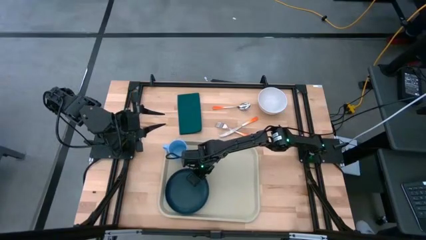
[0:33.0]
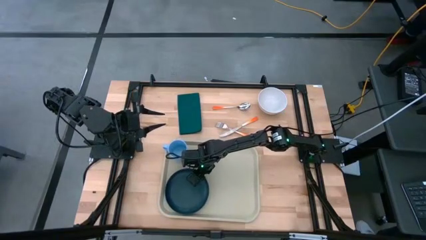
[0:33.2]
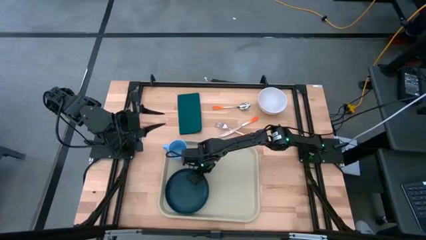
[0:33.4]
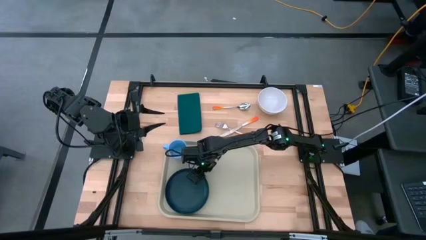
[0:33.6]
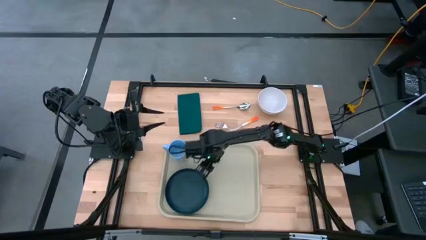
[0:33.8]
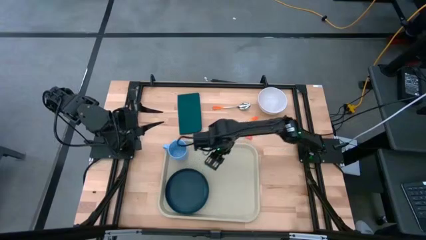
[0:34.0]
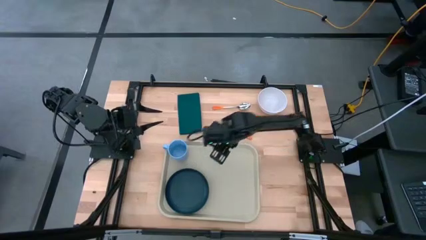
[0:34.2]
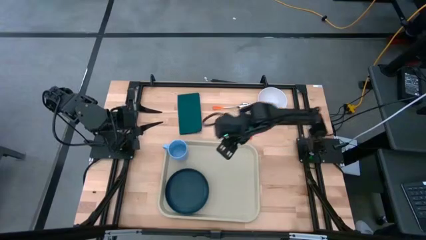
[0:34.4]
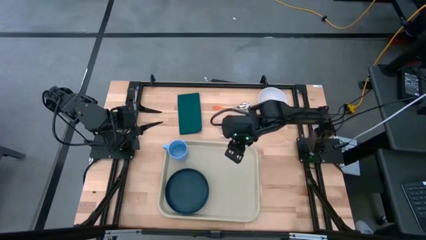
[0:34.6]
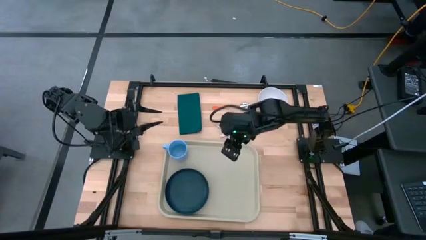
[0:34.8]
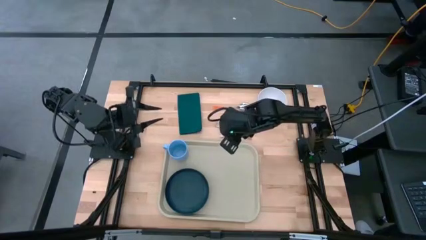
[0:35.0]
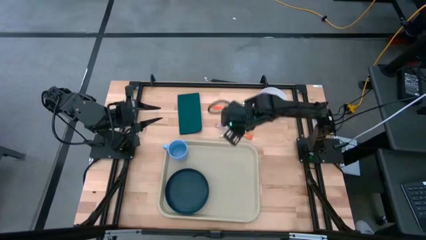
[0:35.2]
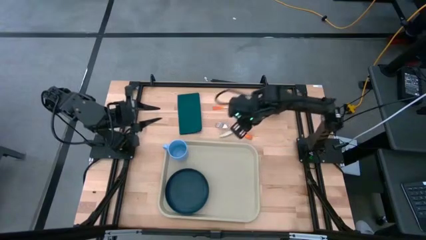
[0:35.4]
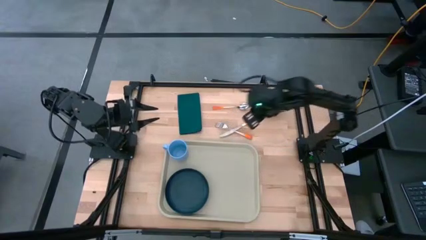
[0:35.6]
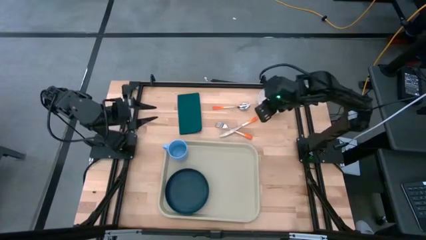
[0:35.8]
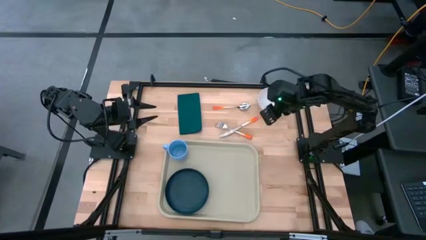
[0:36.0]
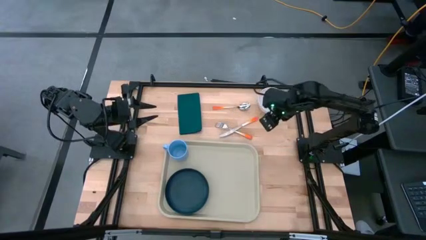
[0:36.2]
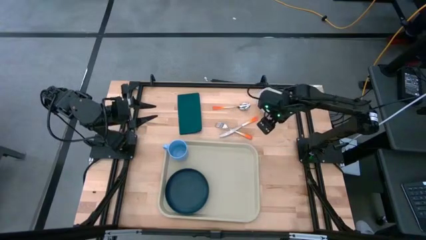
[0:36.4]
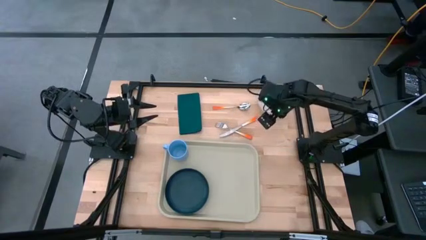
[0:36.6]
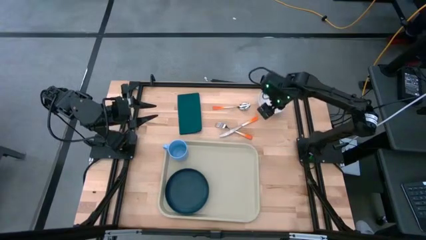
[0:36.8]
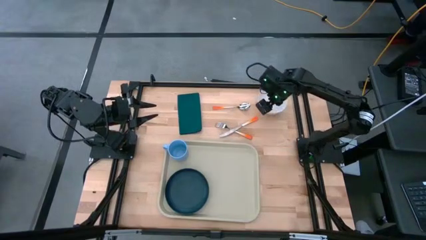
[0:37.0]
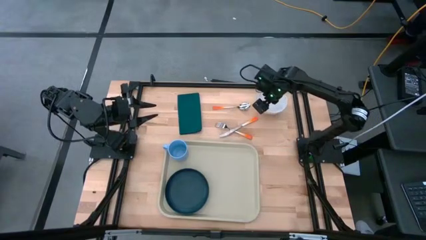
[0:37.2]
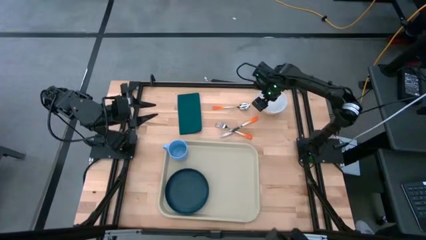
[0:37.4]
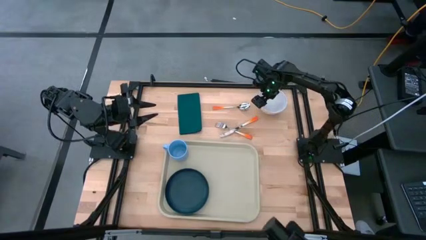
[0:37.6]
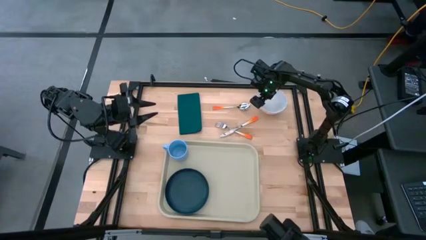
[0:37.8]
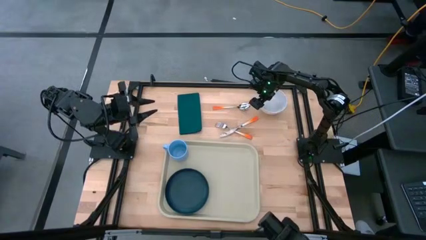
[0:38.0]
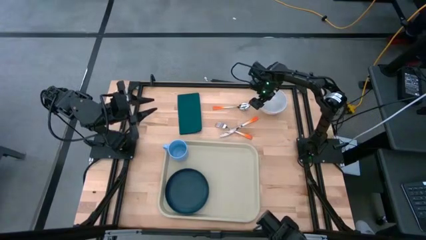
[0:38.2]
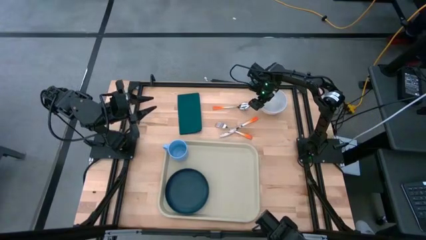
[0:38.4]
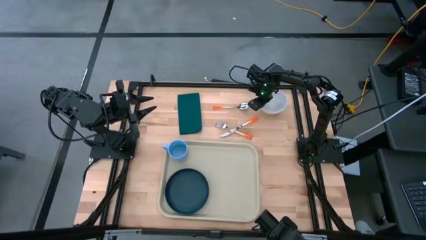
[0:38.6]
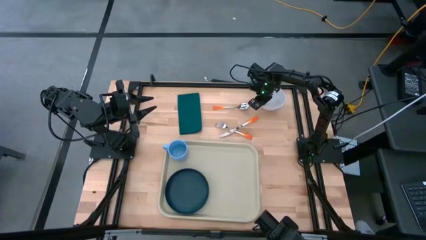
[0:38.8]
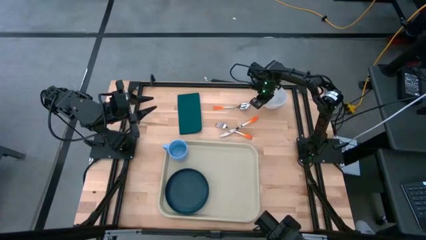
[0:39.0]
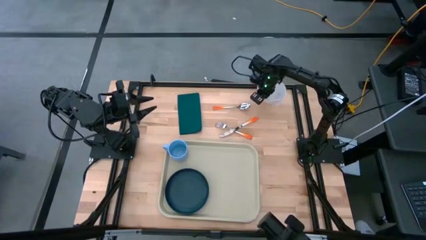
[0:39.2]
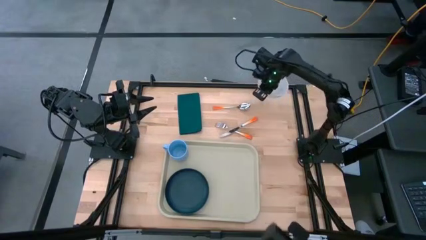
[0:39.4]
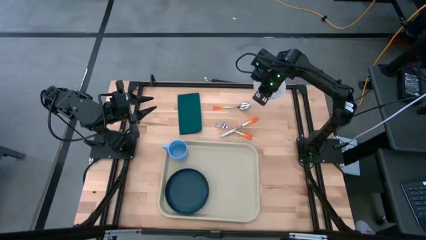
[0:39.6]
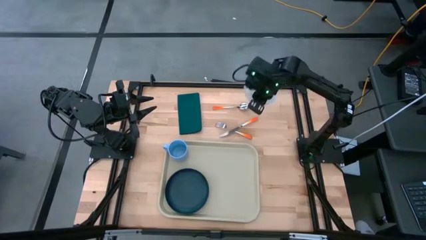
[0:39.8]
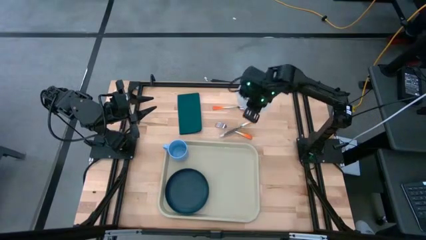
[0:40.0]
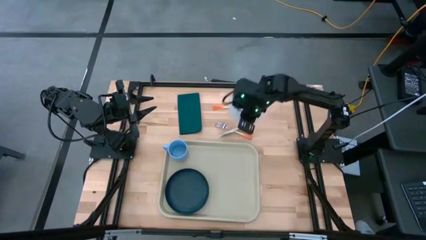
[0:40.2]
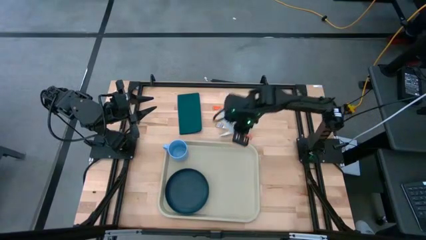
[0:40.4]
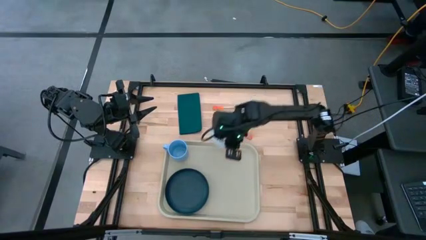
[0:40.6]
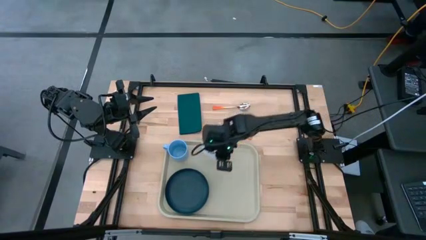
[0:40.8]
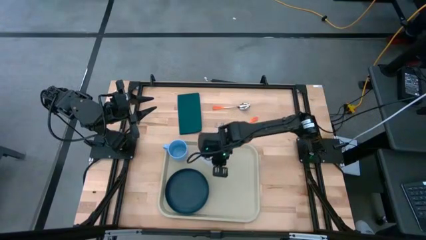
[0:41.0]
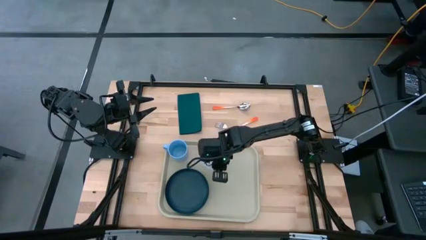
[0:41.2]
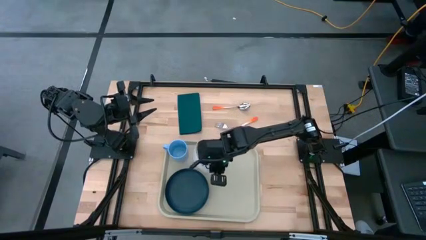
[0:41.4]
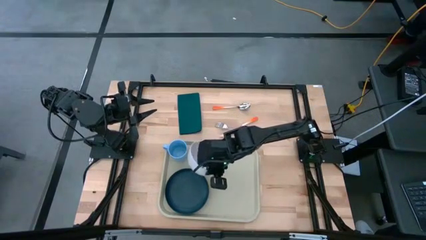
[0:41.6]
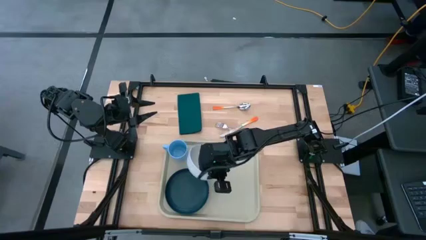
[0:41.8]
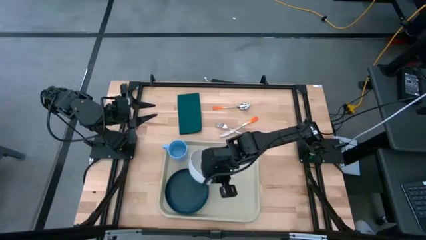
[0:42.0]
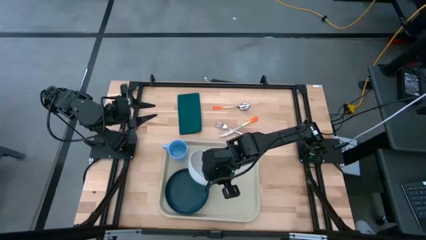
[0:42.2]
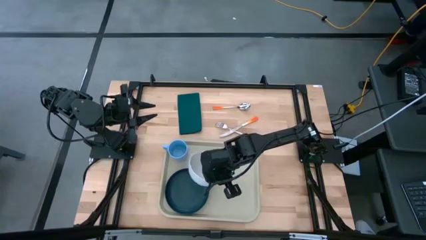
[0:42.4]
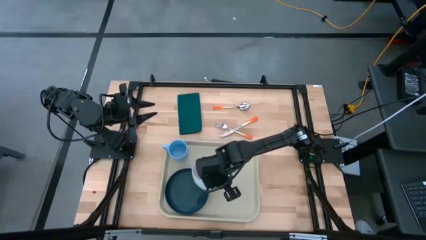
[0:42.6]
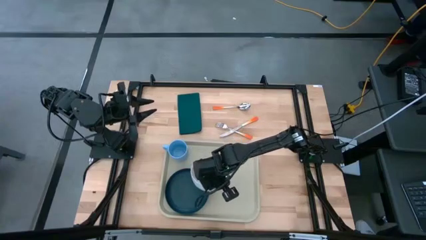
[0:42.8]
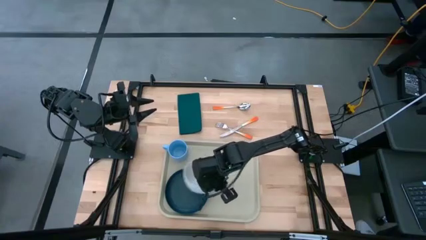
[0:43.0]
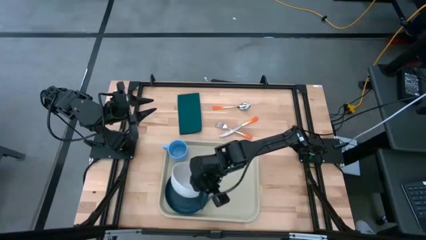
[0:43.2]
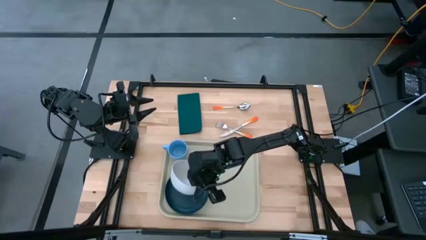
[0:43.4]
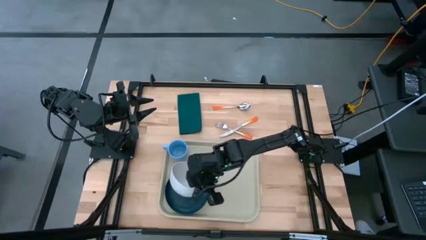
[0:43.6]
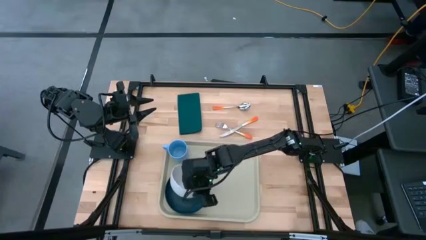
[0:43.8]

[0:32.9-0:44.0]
Task: Set up tray
Put the white bowl on top of the green plate on the gray tray
